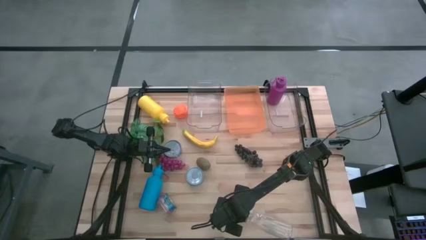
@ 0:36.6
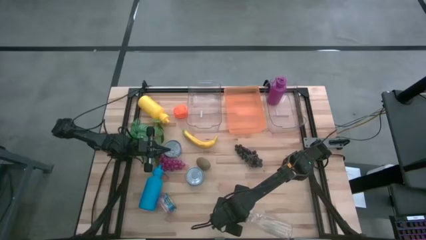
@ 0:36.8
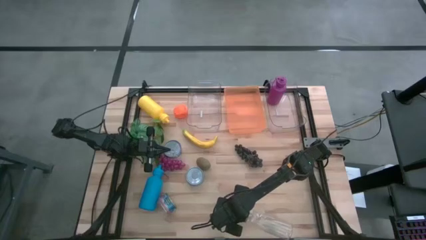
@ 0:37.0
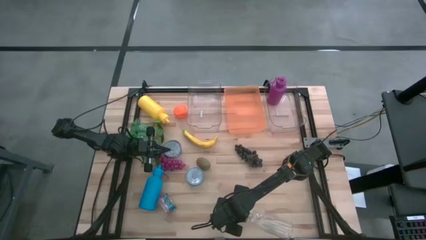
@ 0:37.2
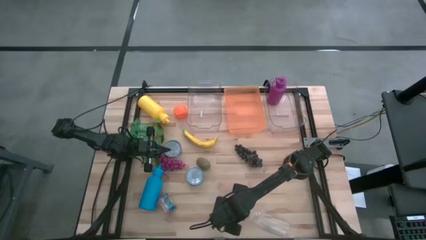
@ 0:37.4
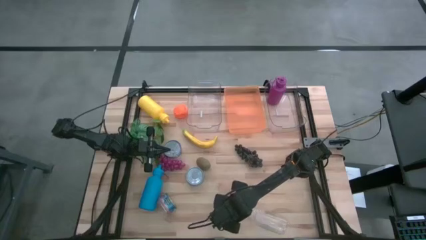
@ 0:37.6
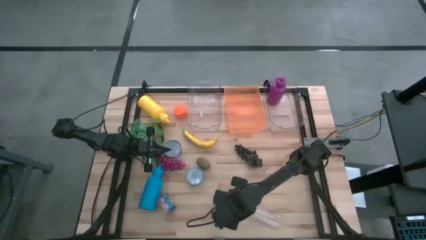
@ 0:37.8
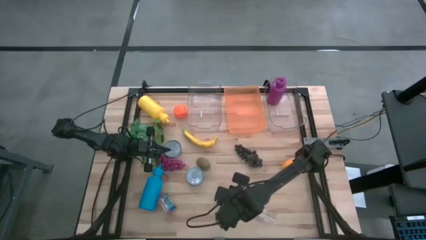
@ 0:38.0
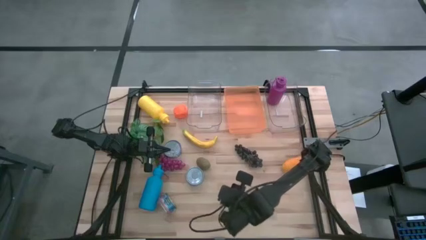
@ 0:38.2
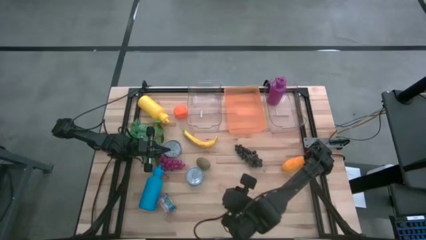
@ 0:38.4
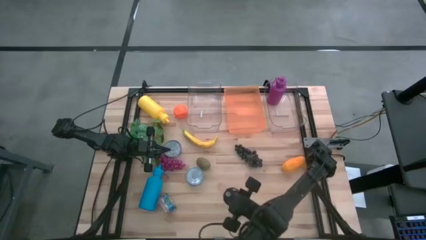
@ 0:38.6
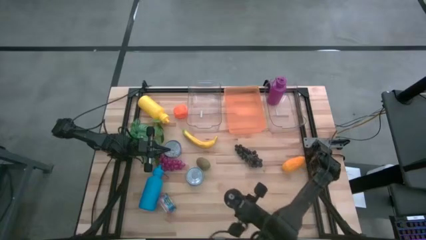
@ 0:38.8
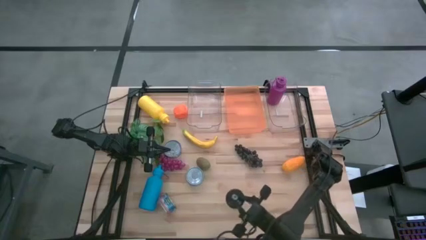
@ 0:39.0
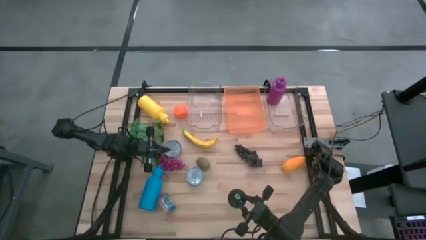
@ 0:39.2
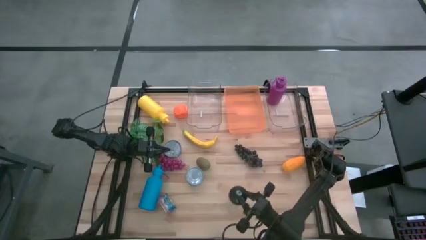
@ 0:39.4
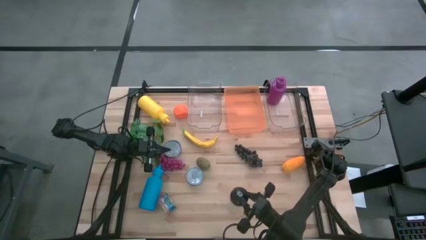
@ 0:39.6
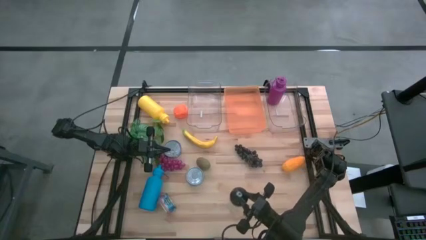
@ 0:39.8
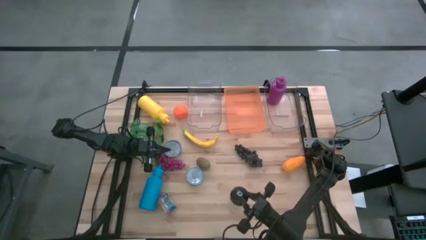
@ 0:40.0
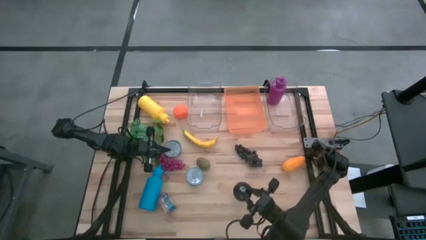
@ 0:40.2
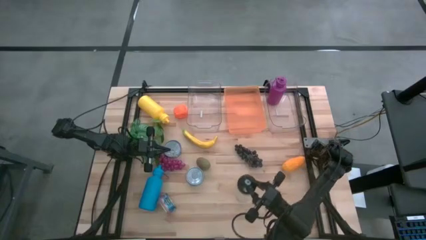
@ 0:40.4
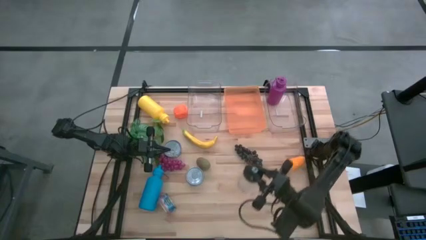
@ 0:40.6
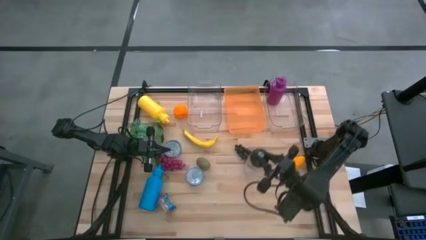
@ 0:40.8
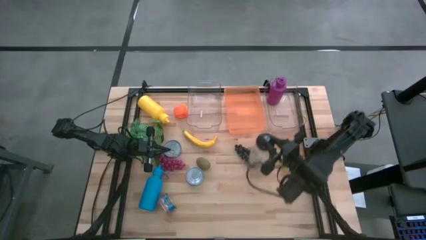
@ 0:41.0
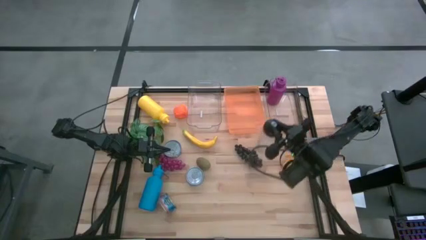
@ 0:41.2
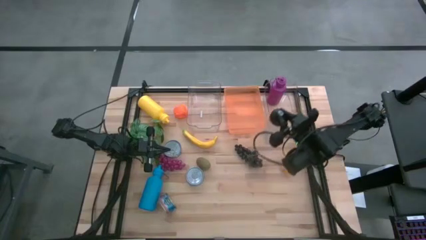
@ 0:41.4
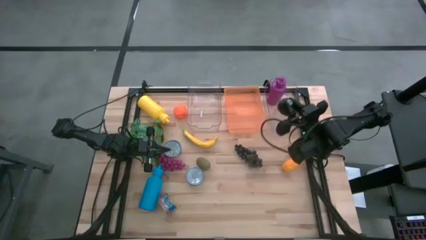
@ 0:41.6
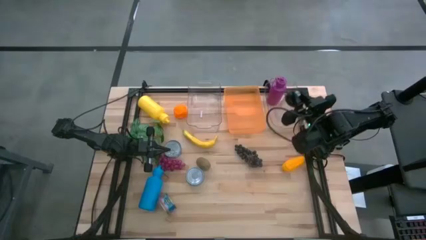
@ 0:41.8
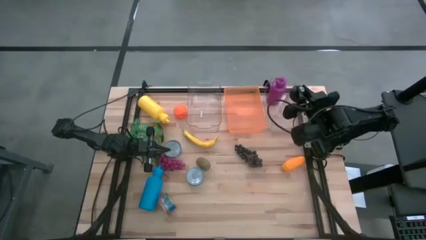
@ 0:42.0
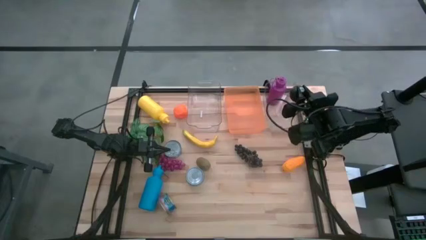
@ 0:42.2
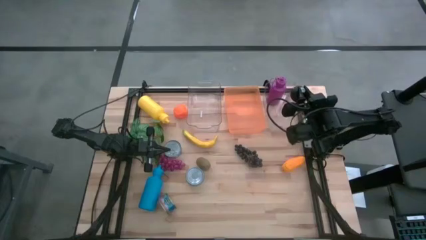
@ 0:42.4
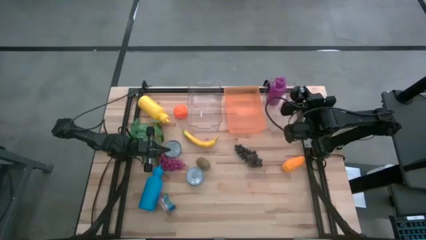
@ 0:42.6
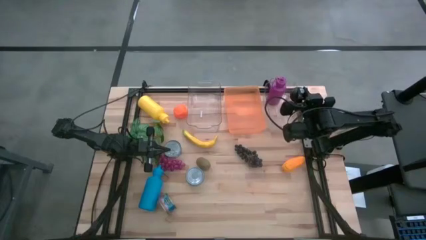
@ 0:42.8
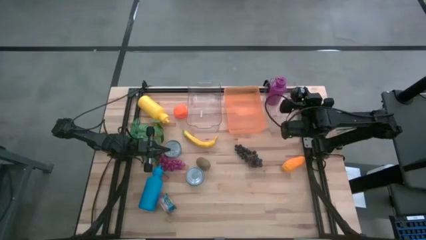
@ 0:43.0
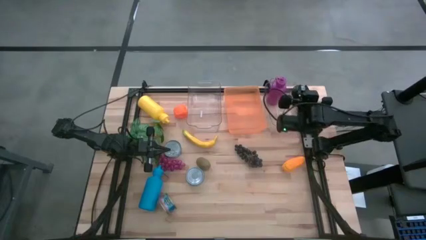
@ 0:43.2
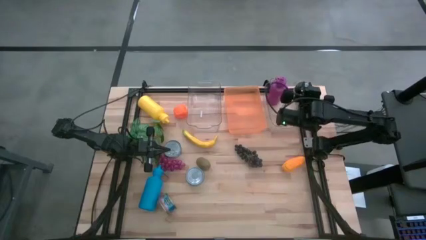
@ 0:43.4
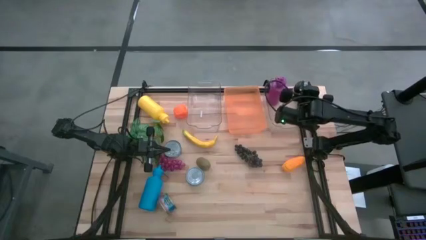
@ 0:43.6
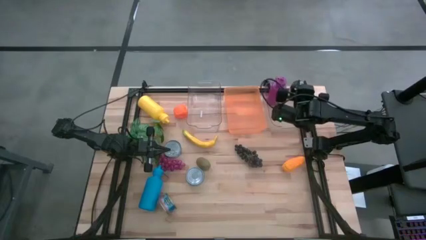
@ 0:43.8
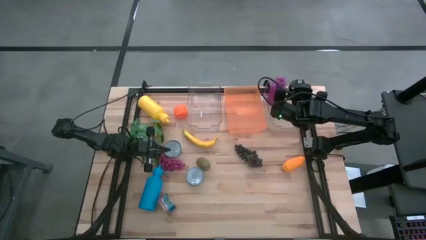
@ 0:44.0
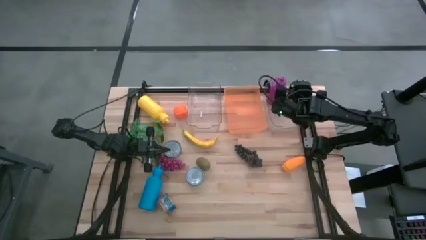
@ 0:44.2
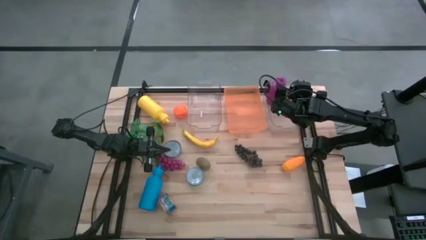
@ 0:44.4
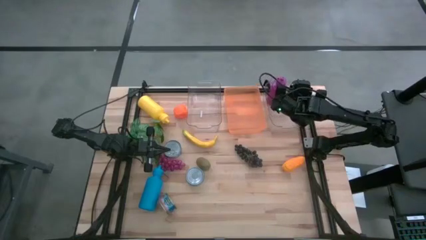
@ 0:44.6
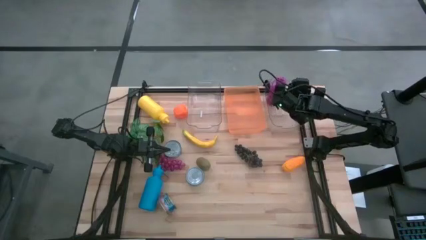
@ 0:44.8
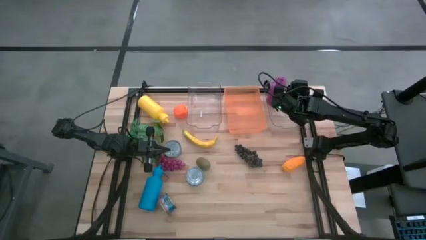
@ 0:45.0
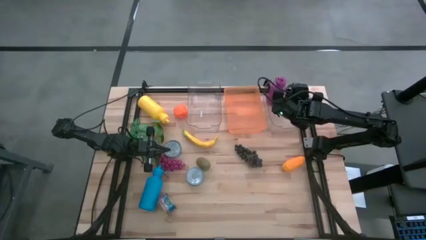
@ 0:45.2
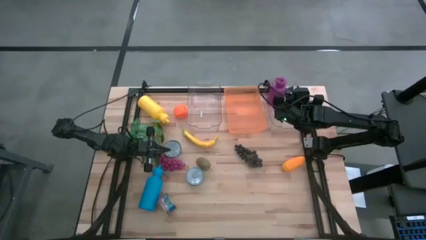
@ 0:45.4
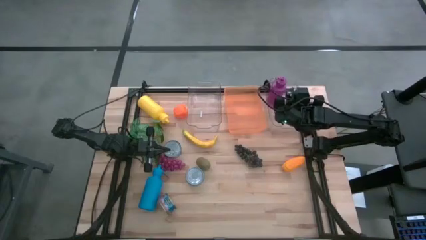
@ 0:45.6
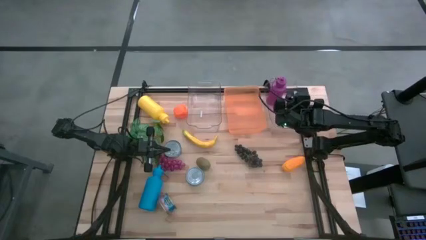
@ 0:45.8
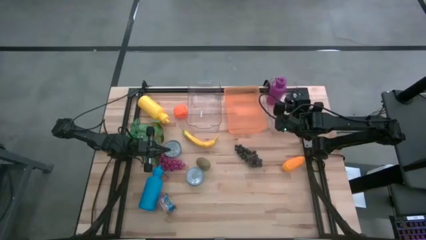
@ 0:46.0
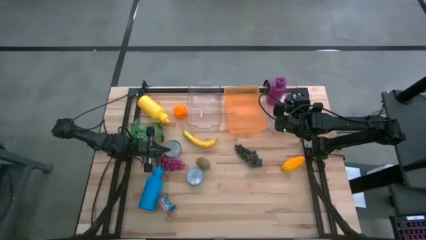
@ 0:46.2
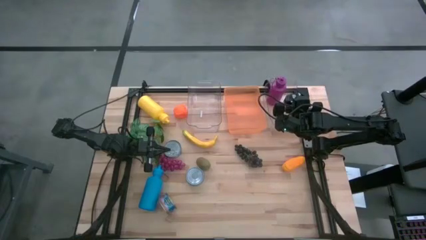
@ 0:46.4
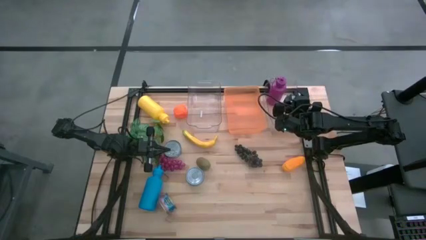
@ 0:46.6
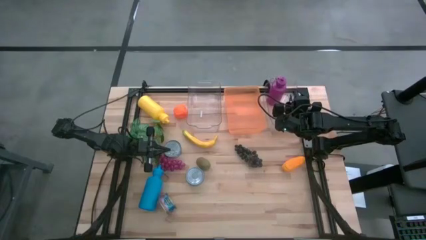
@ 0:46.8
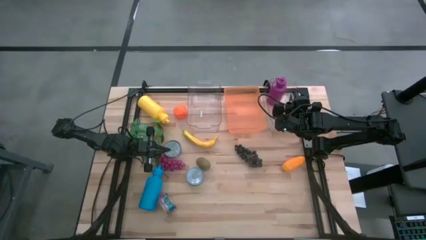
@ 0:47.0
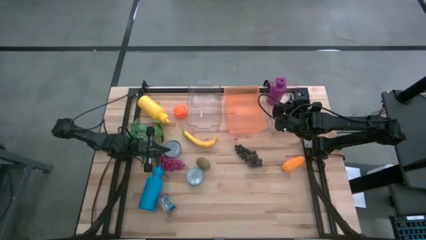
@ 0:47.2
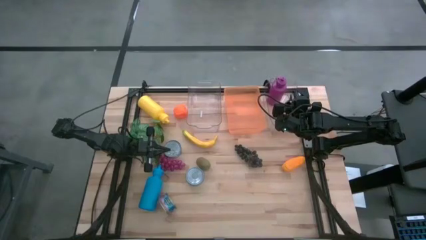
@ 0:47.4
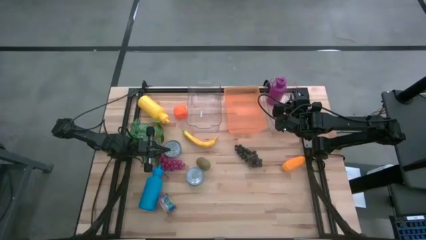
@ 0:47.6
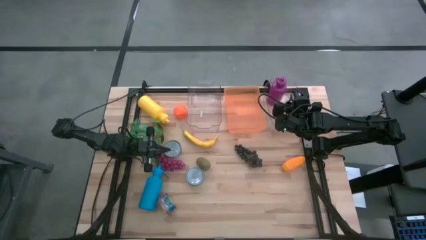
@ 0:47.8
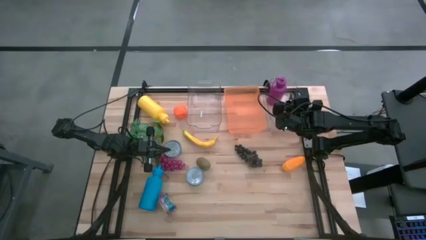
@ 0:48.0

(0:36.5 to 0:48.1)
Task: Pick & Place Food Item
Put the transparent water bottle into the right transparent bin
